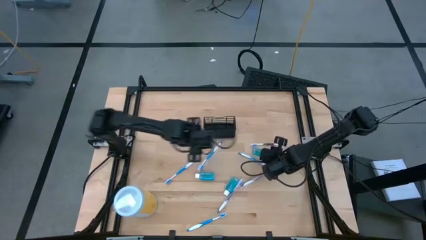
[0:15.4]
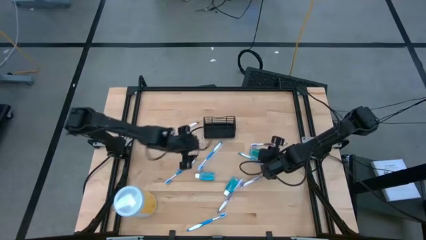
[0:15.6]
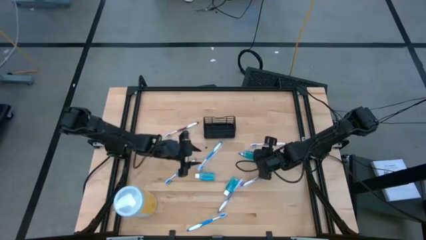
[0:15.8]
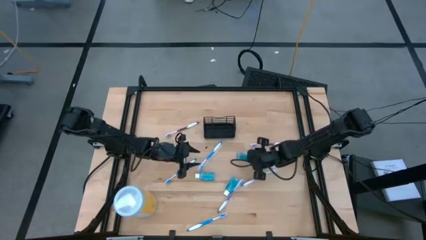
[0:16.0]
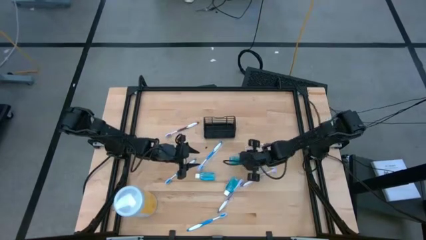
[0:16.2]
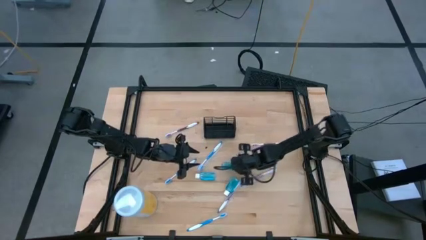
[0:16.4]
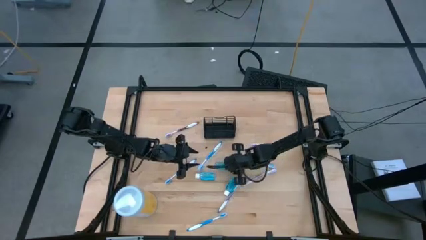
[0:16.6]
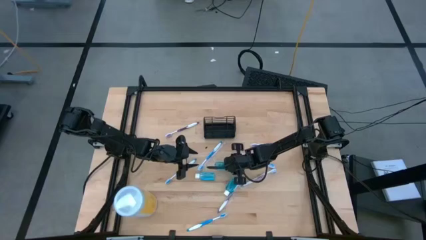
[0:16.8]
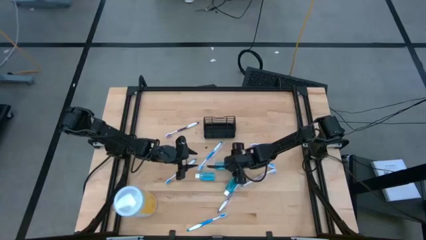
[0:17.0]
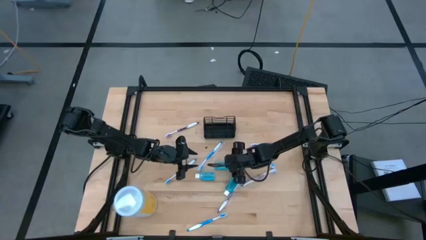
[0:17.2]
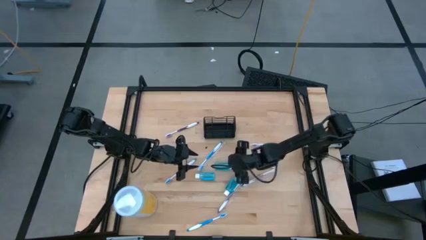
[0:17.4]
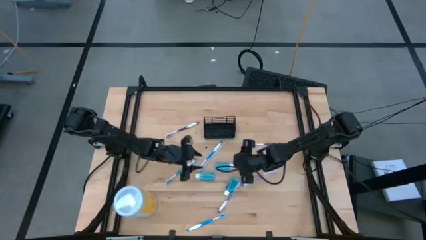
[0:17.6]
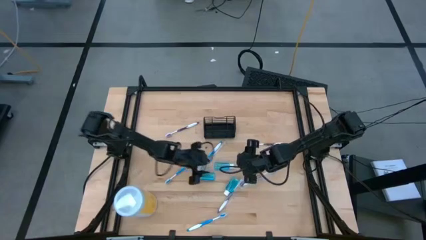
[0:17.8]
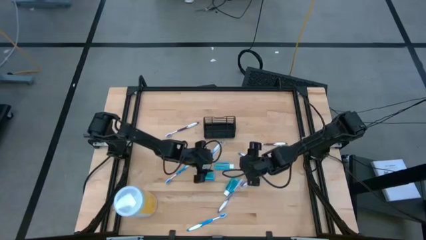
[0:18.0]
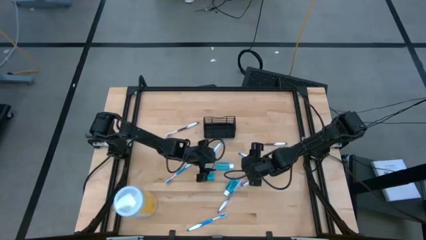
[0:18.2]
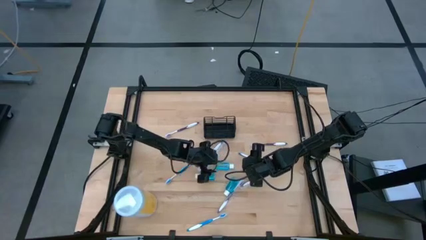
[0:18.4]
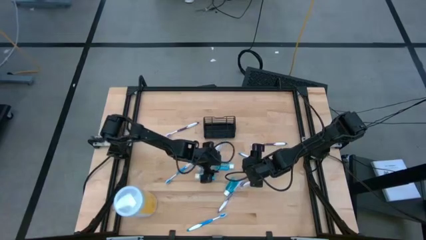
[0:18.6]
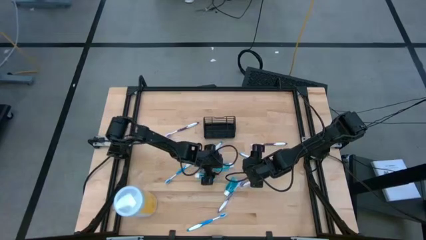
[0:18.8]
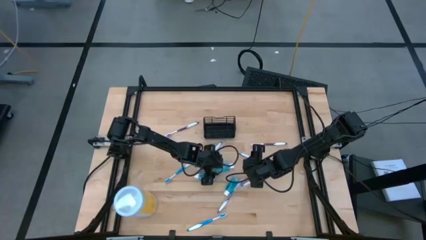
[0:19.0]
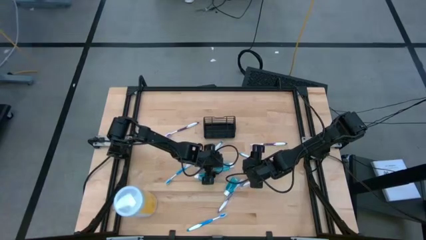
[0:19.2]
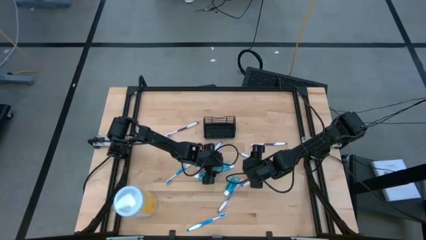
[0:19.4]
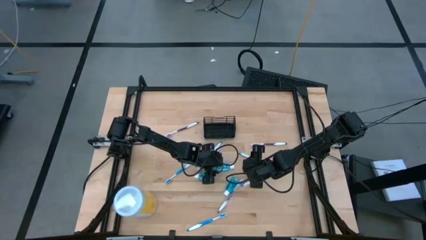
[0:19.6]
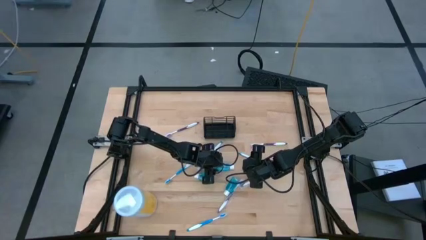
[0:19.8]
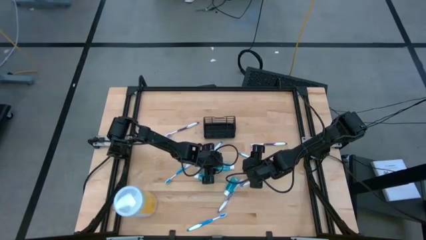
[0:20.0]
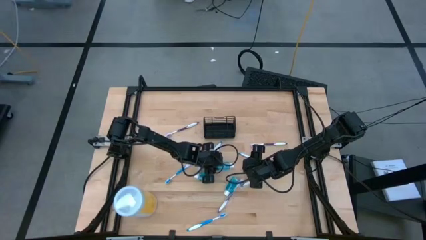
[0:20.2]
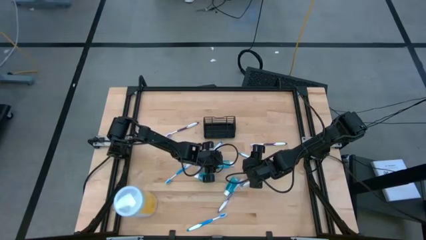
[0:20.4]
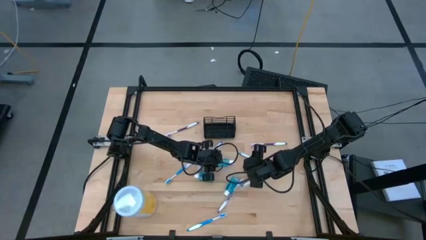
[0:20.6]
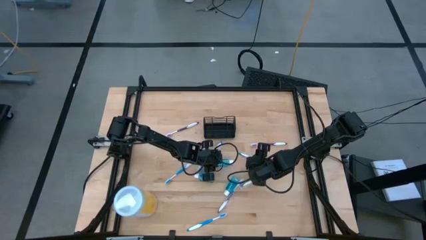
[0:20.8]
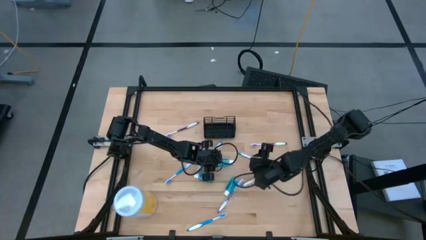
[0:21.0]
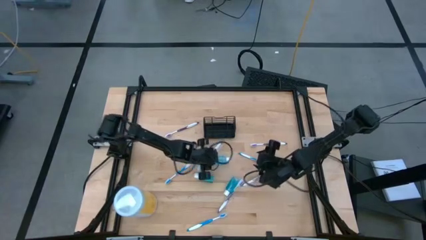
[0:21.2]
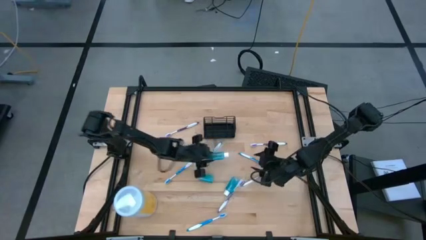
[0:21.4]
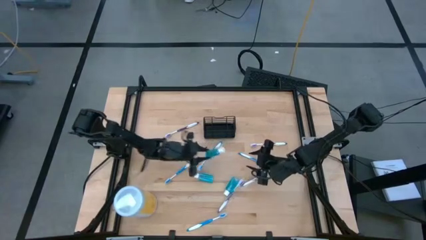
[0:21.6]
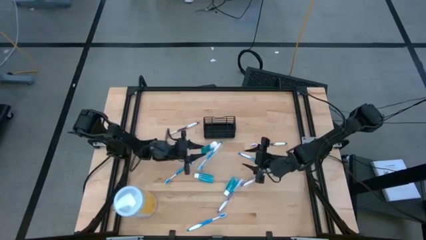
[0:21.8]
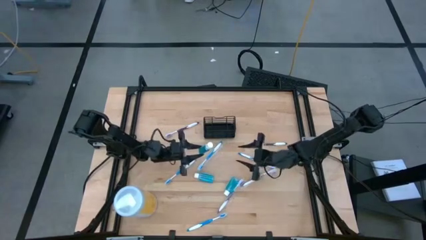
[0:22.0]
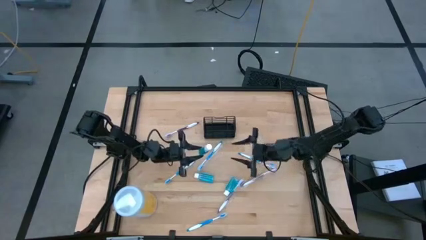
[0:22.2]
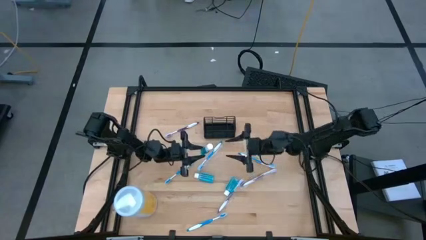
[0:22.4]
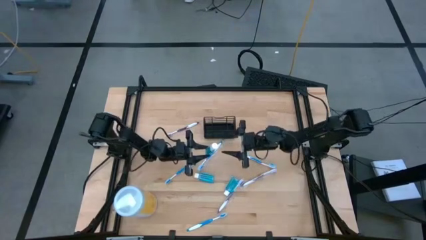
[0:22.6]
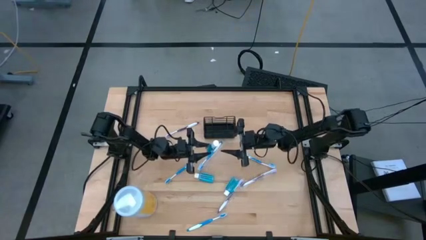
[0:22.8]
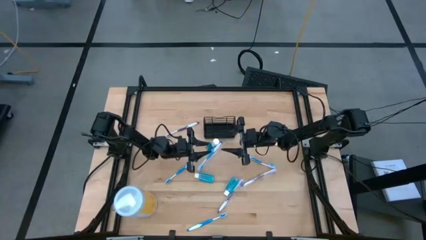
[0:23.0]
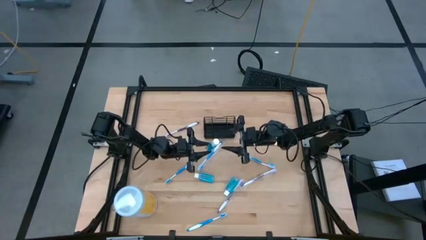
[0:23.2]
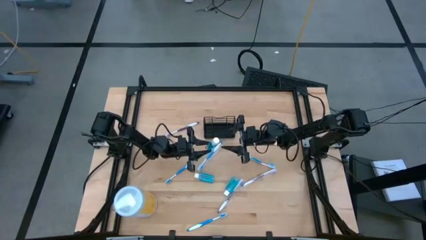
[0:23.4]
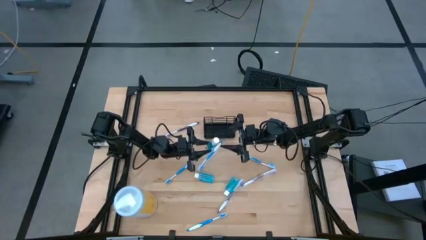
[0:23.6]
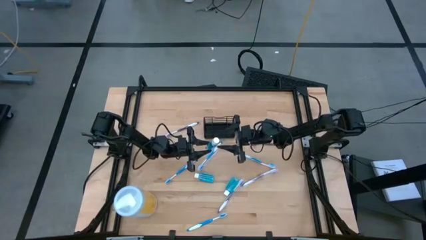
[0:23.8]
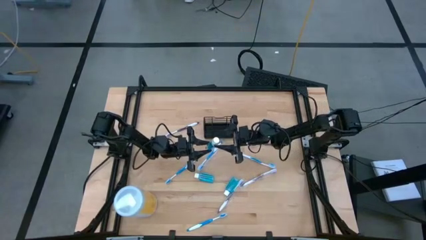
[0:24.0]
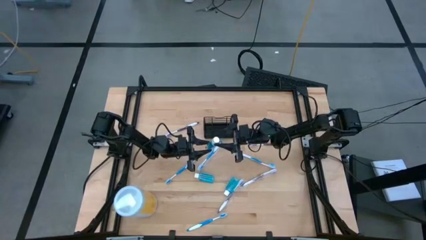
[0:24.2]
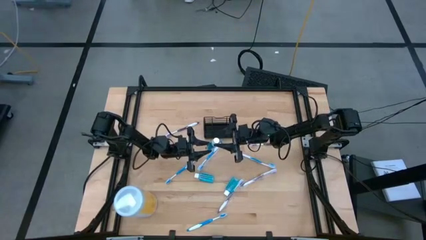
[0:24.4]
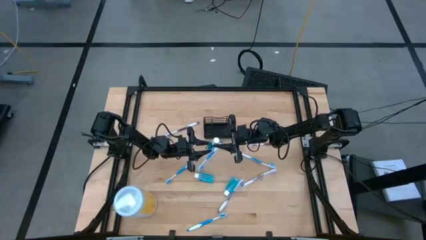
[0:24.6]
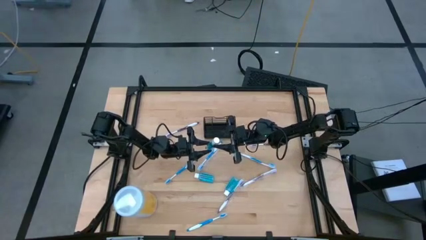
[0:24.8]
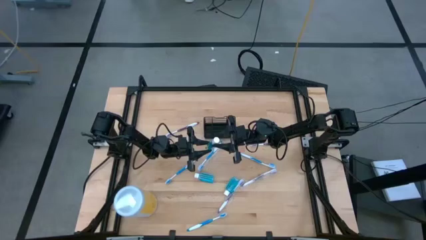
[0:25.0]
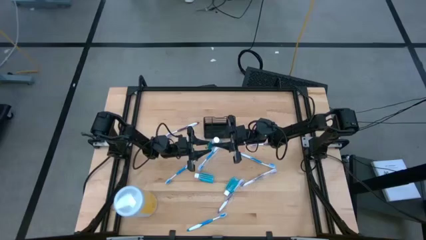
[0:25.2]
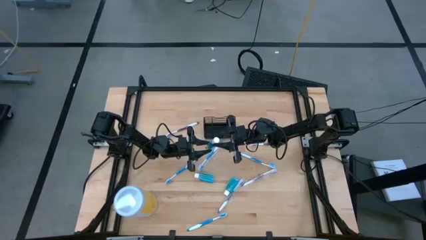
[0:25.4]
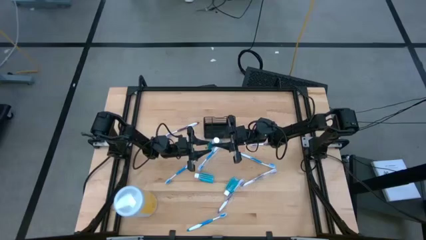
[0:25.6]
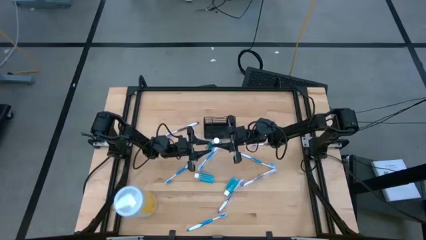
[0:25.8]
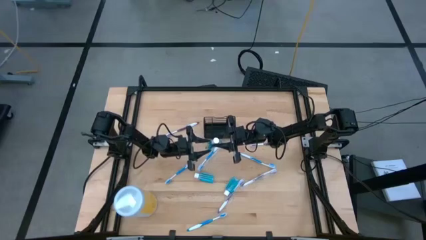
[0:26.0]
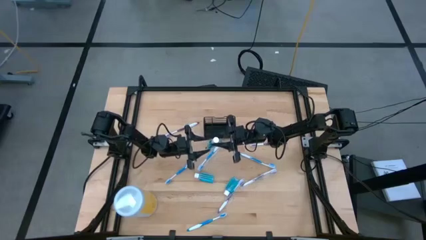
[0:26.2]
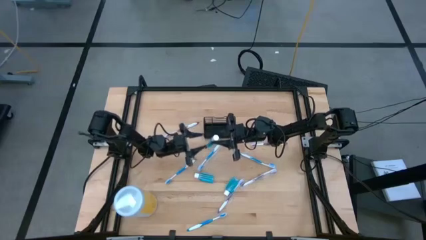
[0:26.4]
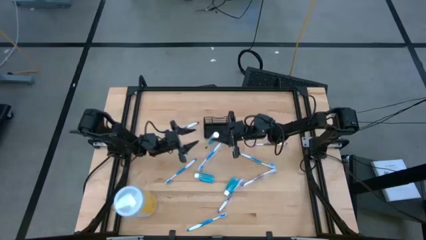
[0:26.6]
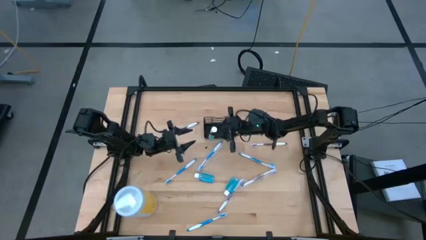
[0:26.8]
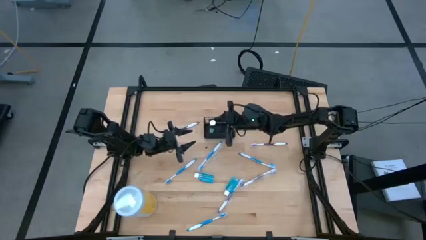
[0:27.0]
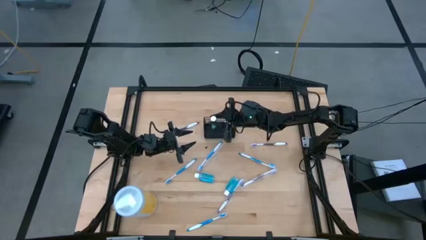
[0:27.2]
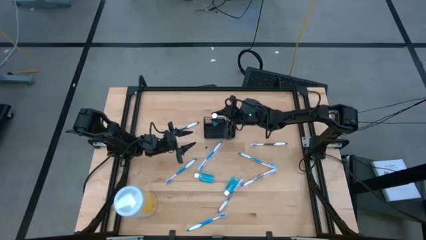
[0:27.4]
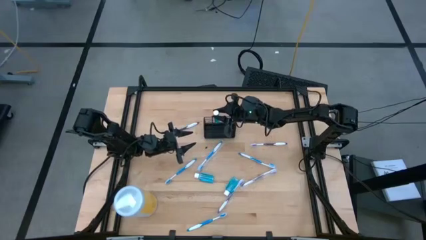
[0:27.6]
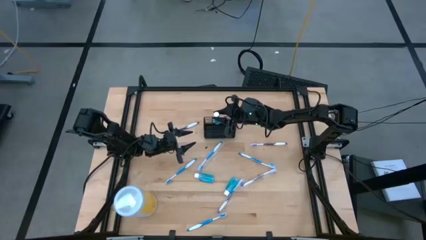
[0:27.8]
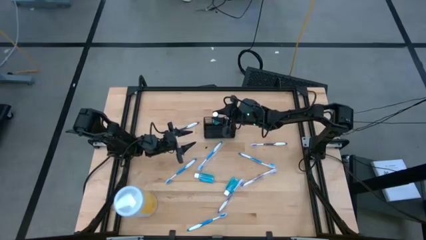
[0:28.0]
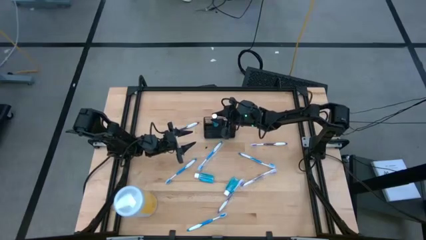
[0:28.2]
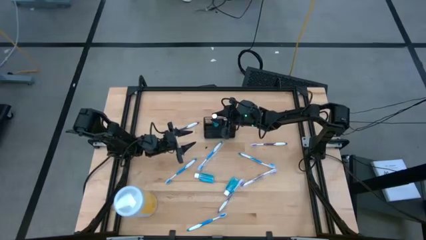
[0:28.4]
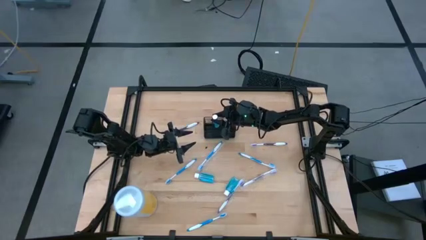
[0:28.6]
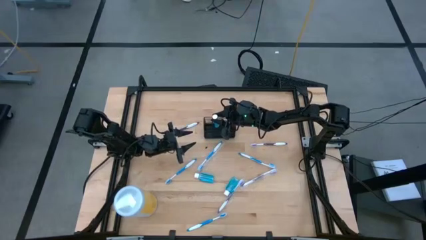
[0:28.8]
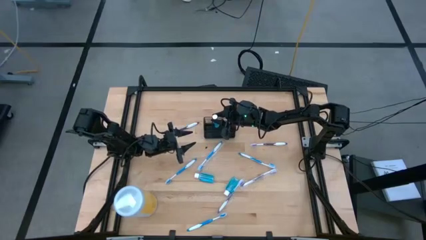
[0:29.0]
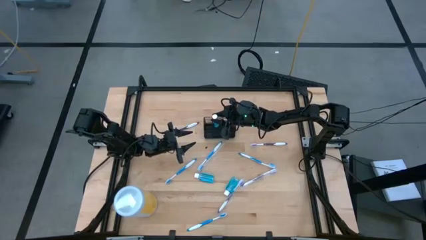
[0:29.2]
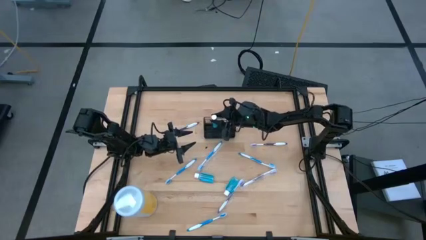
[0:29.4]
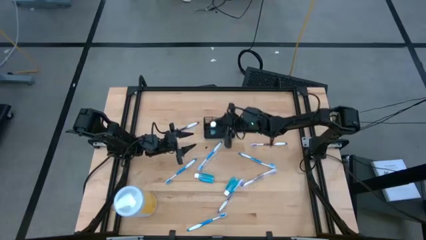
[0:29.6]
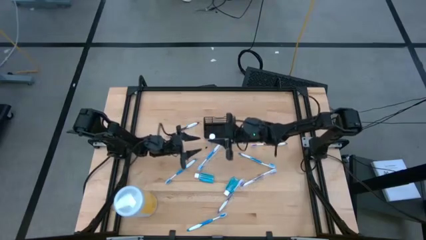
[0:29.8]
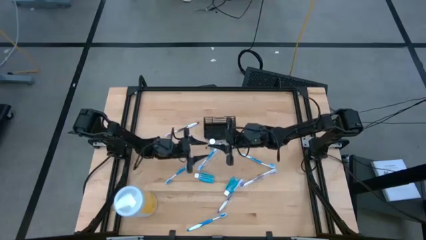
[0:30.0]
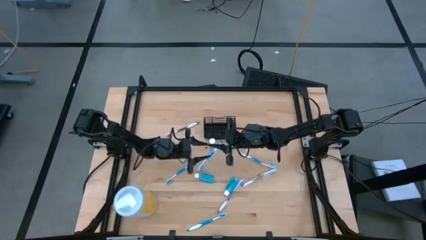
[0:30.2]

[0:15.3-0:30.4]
Task: Pick & Place toothbrushing station
Put the blue mouthwash bottle into the black organizer
